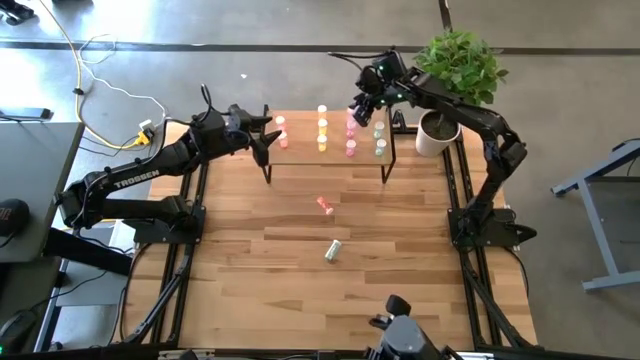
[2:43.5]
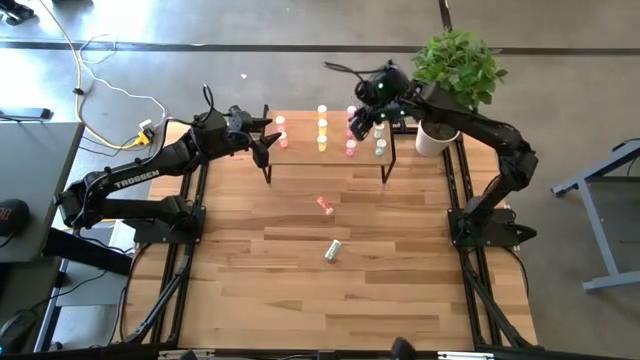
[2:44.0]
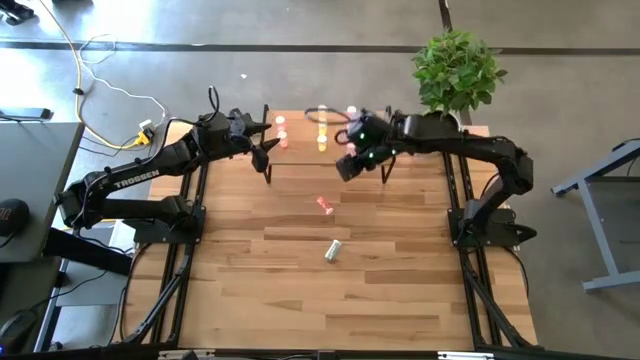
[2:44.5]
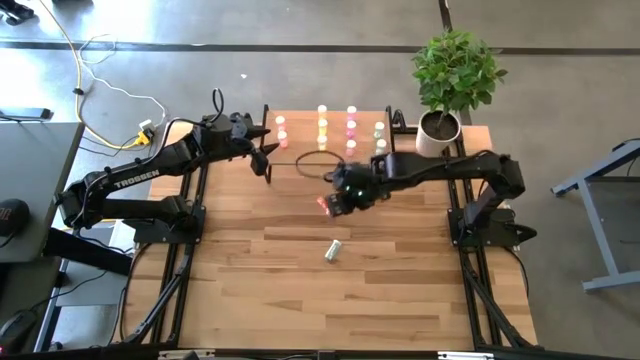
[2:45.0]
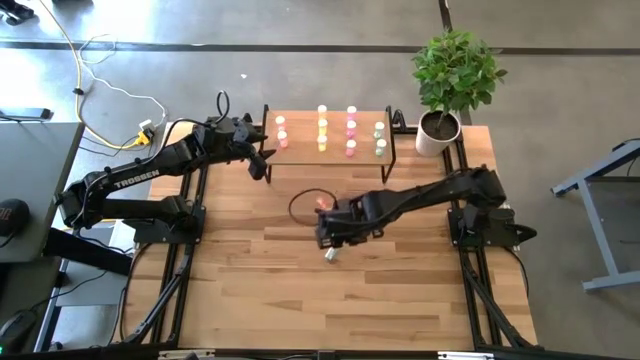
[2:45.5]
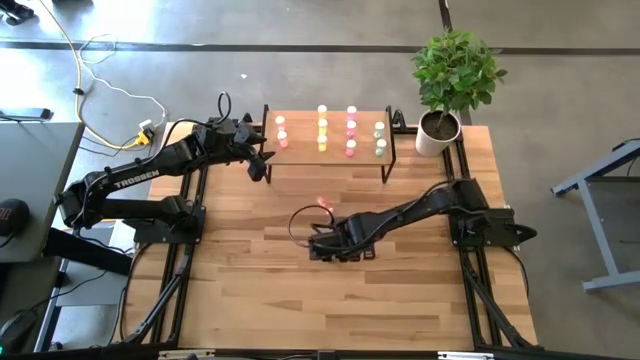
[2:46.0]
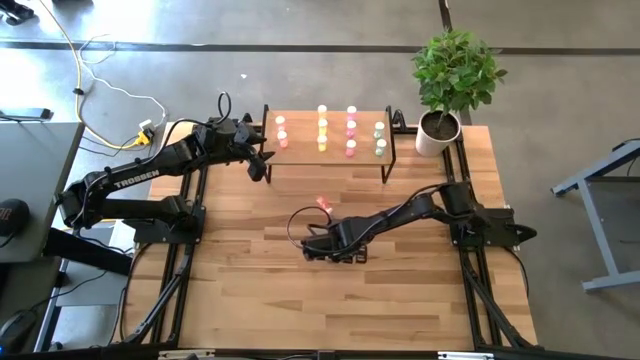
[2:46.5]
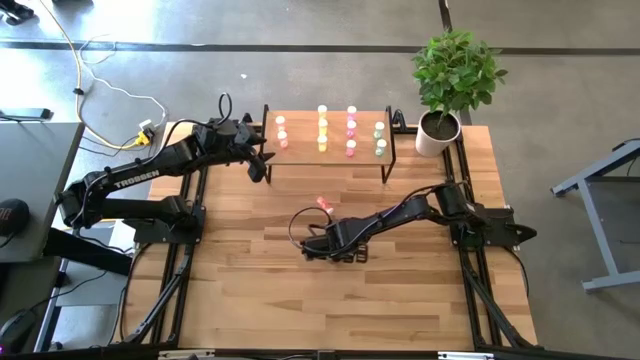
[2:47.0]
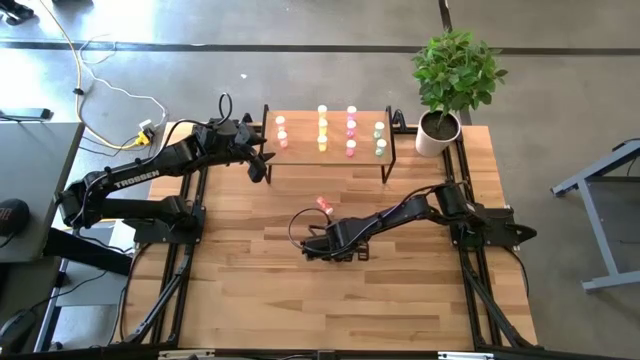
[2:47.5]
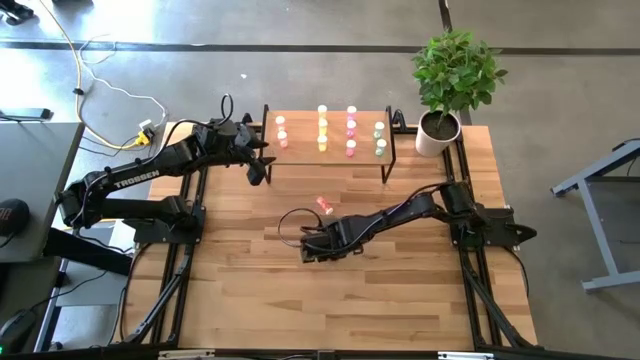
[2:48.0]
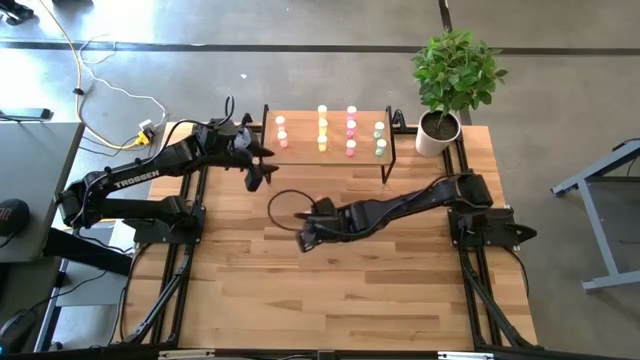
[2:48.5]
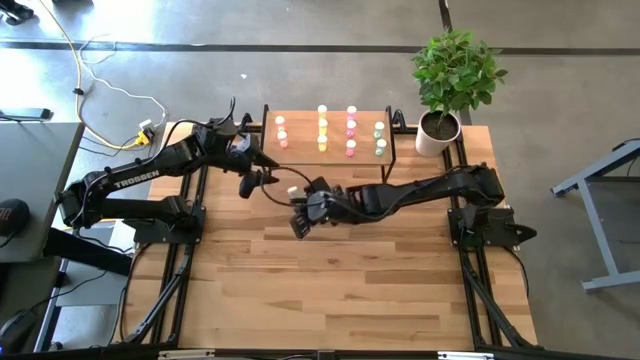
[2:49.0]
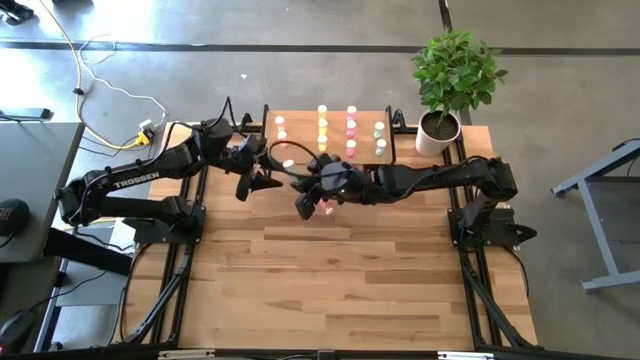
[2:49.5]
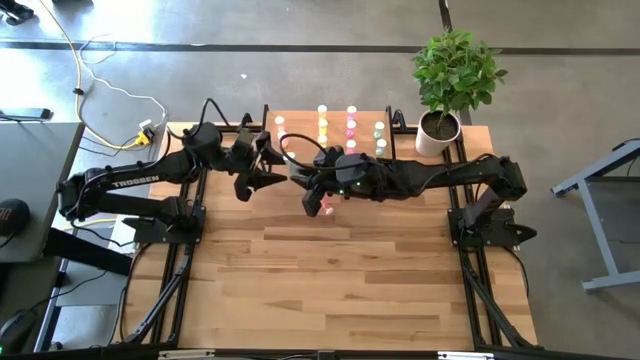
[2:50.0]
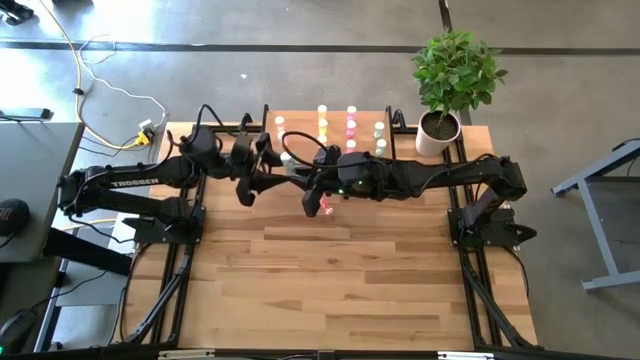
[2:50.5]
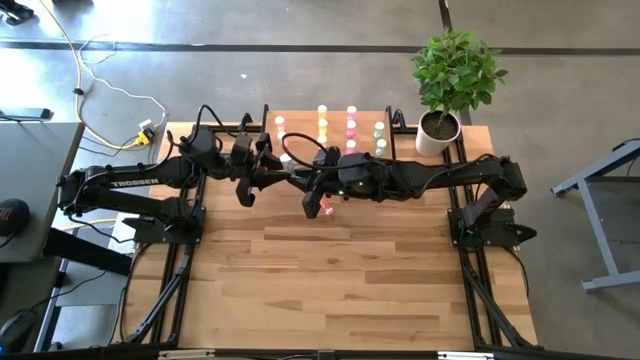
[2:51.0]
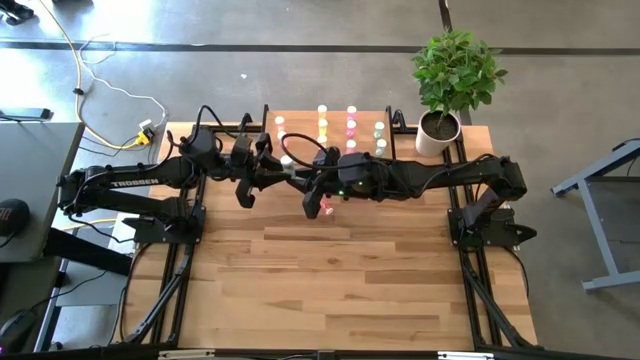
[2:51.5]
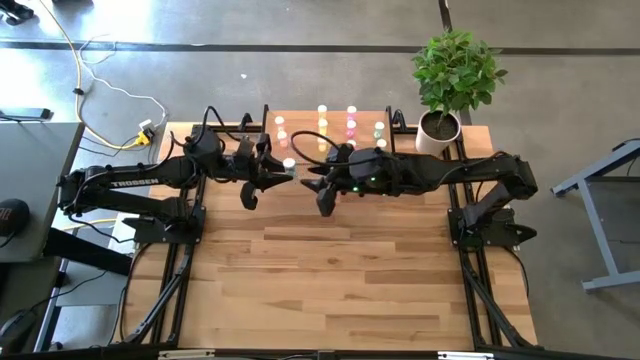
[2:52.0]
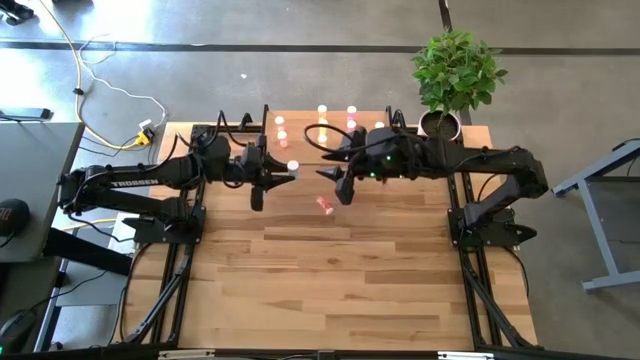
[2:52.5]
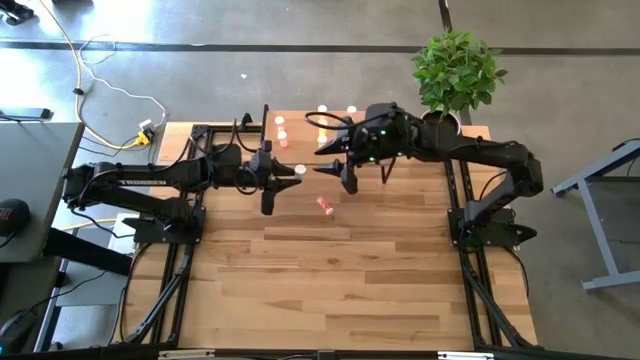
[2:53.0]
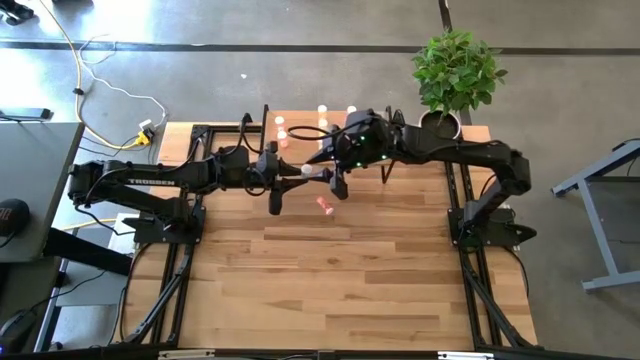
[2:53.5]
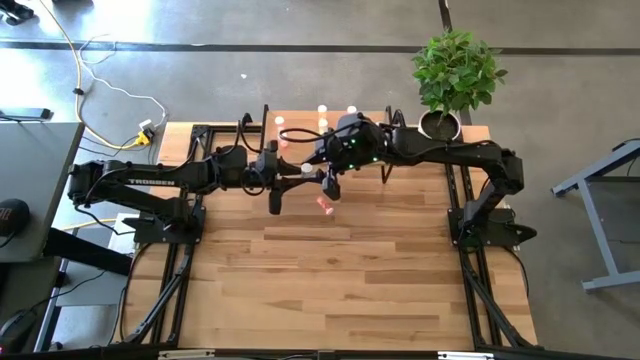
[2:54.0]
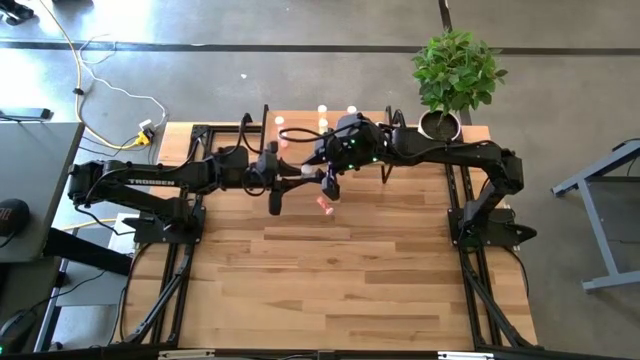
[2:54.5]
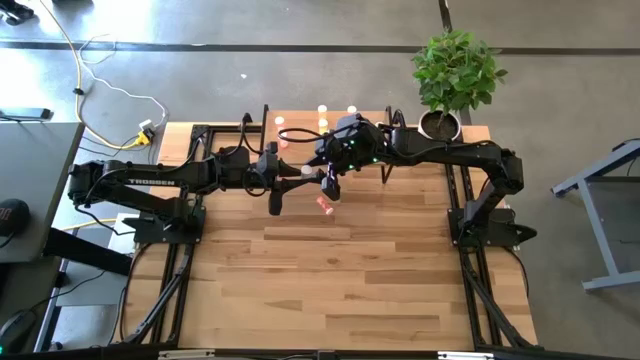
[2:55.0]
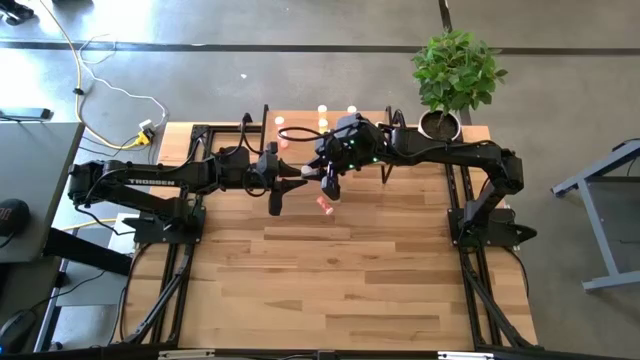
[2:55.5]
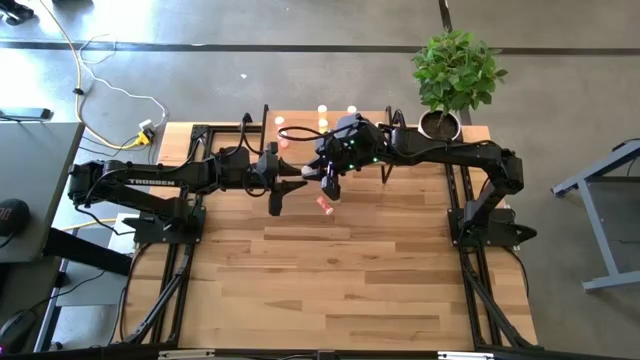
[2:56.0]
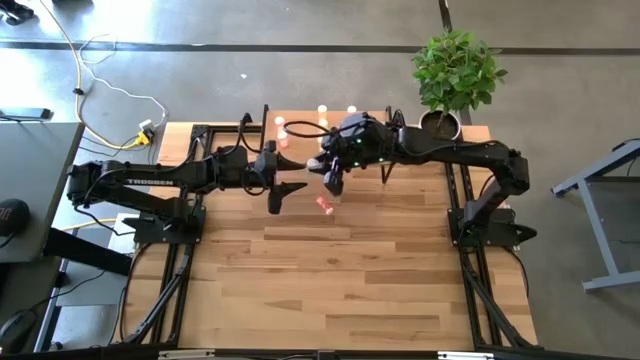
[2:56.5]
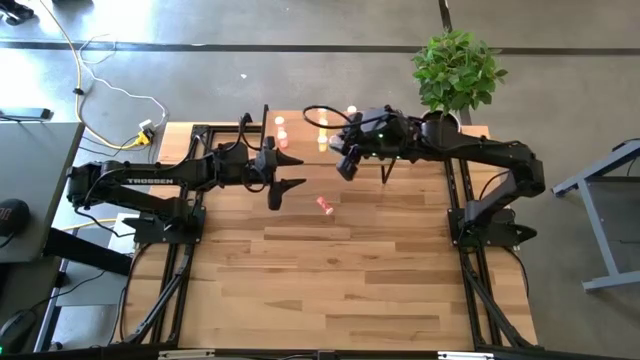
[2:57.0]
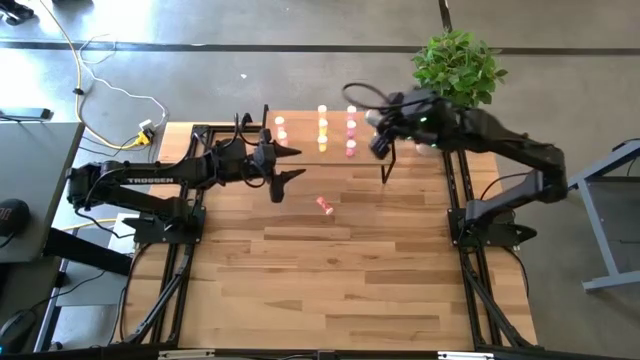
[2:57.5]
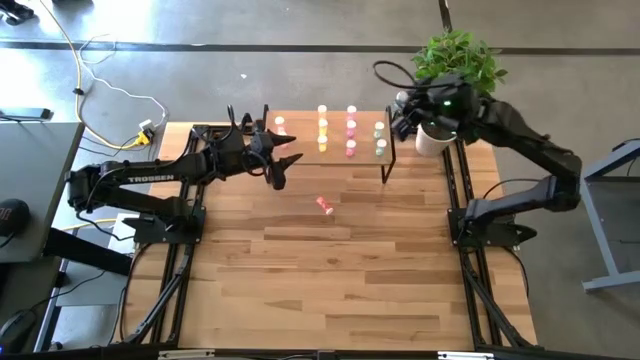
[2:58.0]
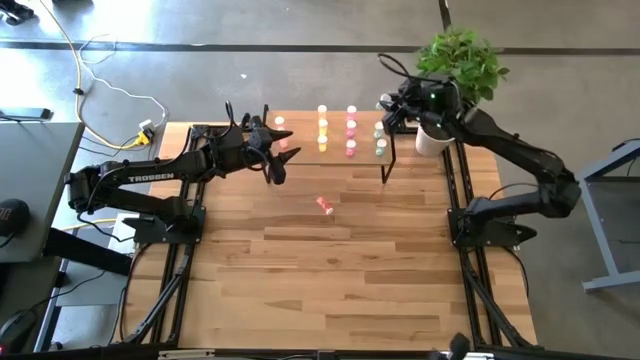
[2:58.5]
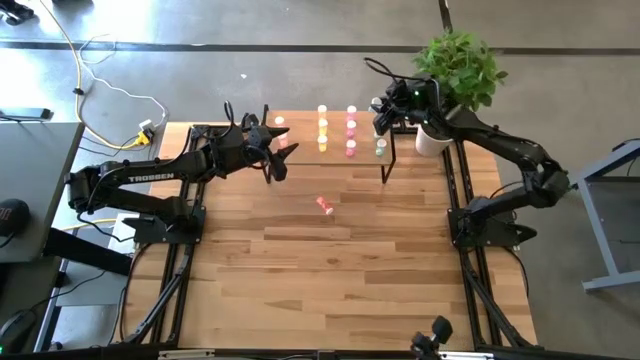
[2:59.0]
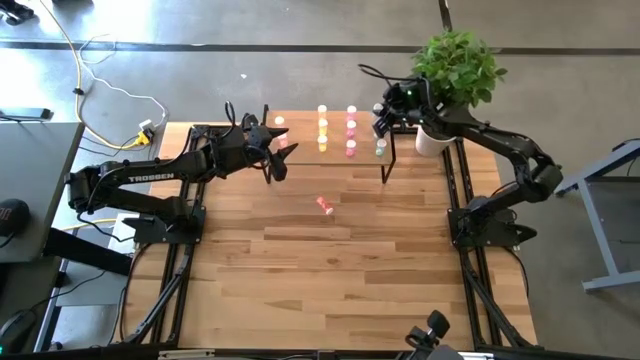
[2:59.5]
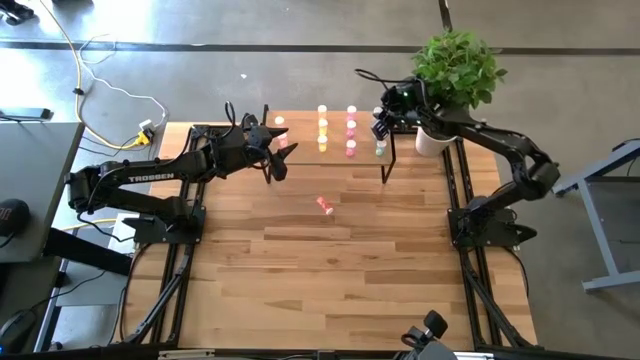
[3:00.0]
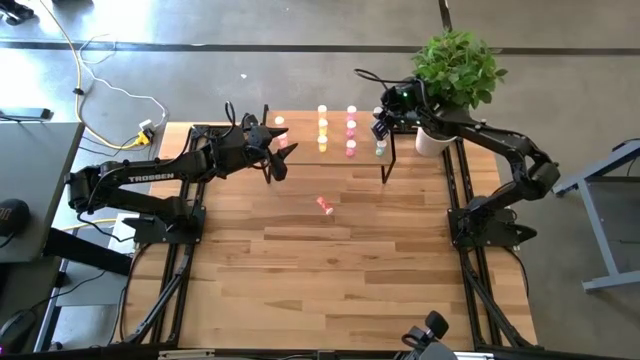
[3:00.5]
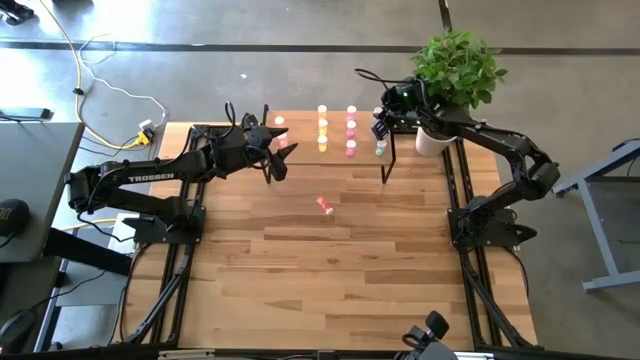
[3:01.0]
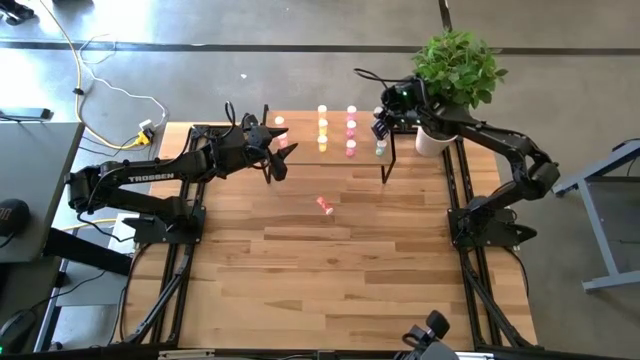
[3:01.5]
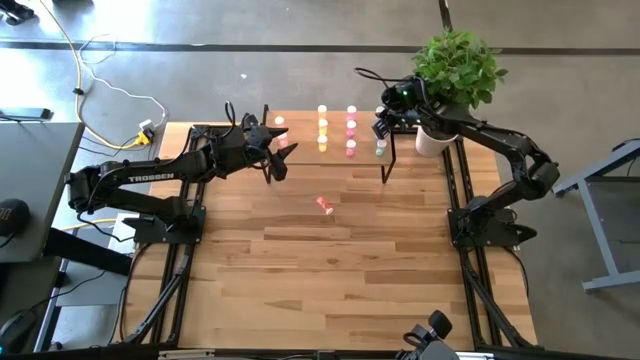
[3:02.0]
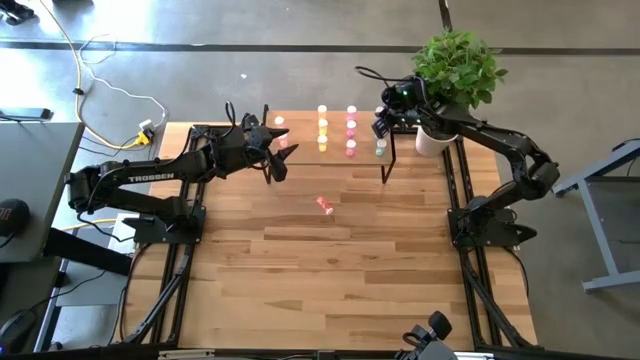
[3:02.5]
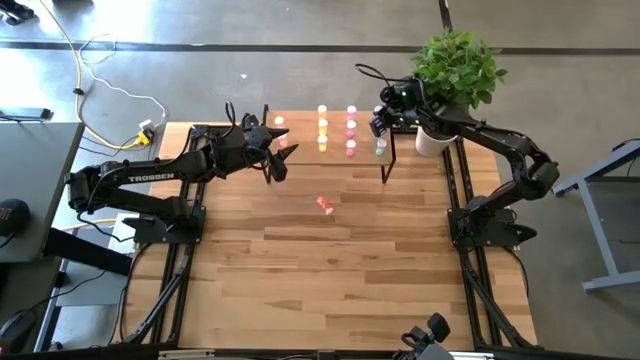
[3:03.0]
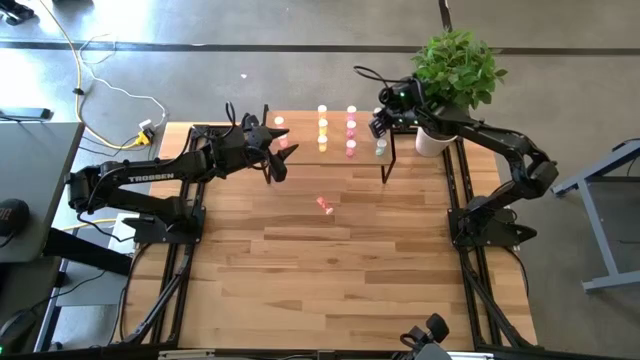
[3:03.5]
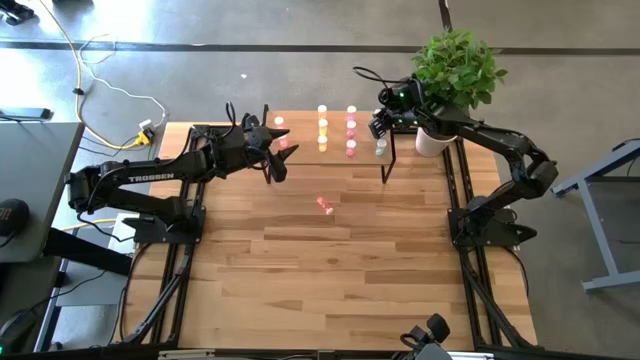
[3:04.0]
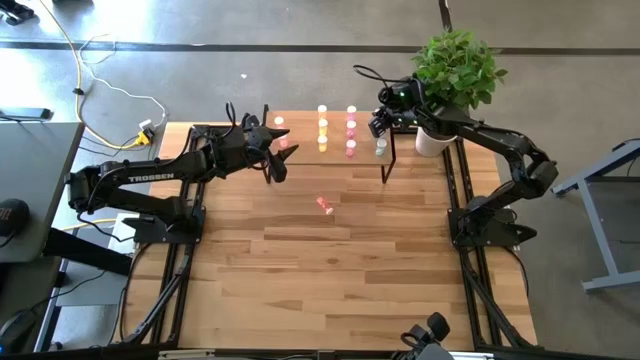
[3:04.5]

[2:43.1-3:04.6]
Task: Pick and place medicine bottles onto shelf by color
Put the blue pill bottle on the shelf aligned with the blue pill bottles
